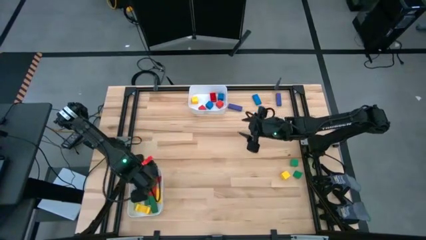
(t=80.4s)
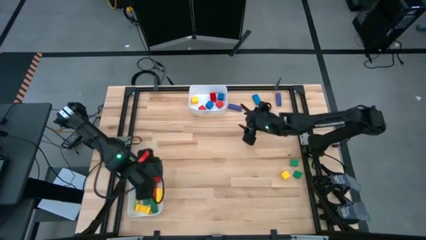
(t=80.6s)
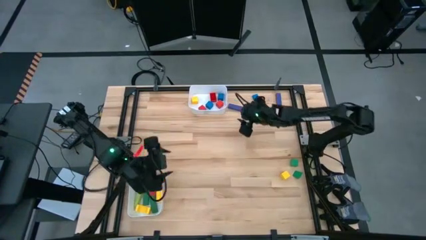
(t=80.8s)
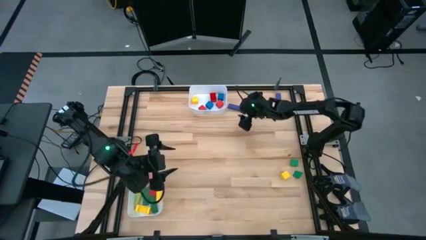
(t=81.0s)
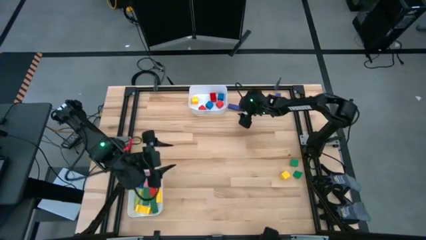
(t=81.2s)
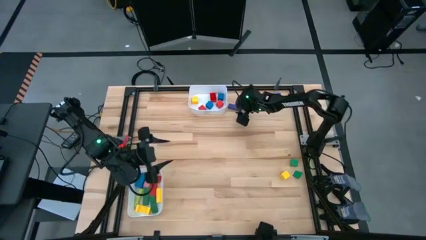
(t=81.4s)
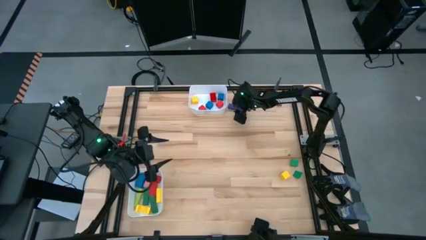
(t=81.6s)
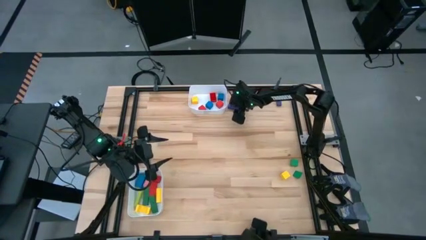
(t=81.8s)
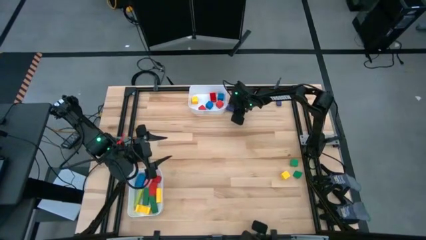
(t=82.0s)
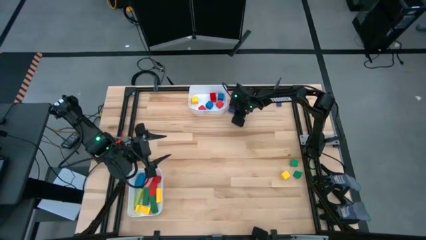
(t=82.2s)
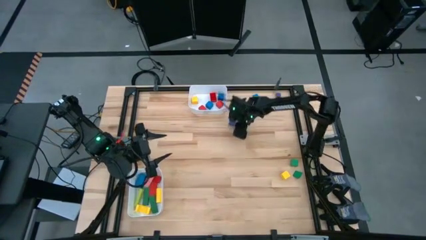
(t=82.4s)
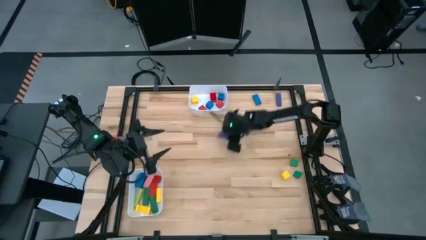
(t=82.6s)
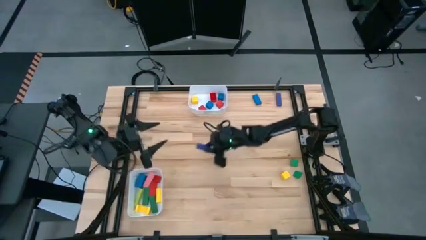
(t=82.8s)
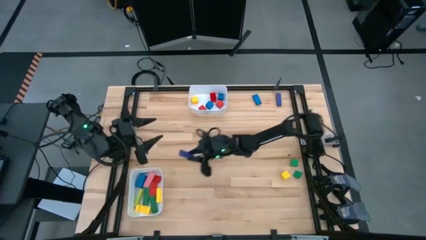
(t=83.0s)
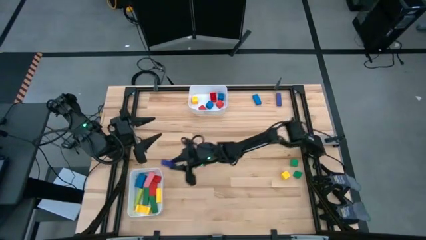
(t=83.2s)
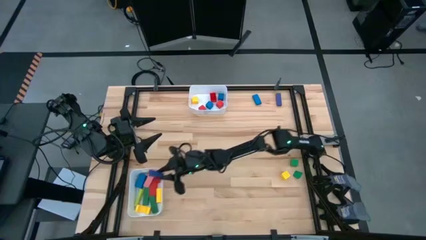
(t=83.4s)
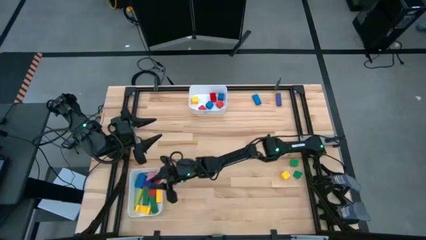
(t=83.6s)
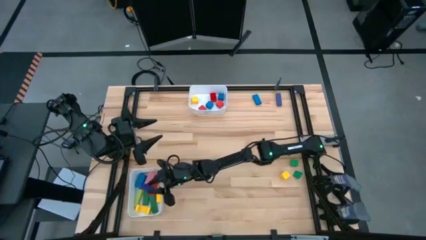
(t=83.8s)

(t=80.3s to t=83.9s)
Task: Sort blocks by size
Put the violet rectangular block into the bottom white bin

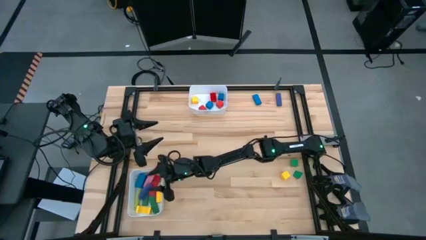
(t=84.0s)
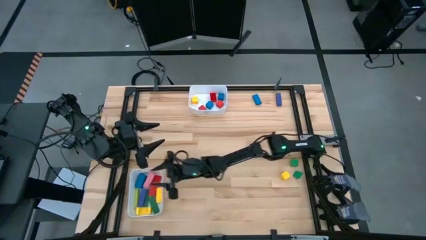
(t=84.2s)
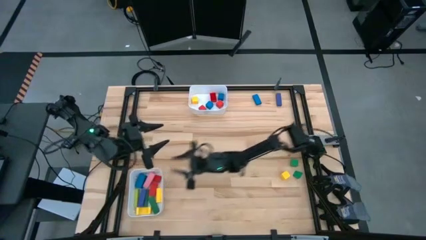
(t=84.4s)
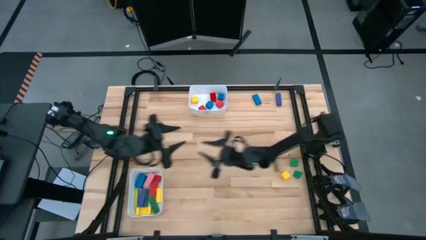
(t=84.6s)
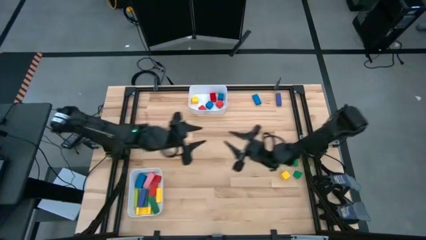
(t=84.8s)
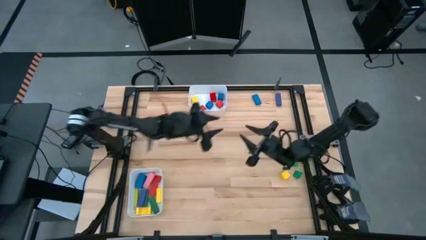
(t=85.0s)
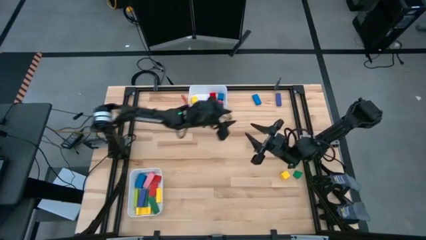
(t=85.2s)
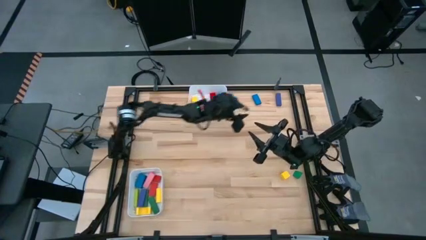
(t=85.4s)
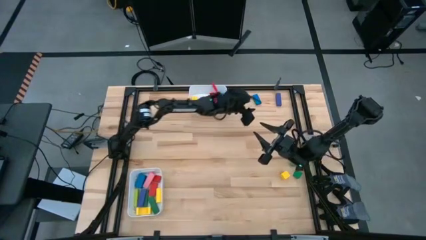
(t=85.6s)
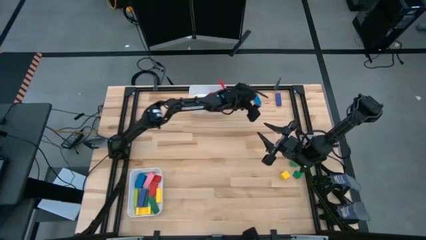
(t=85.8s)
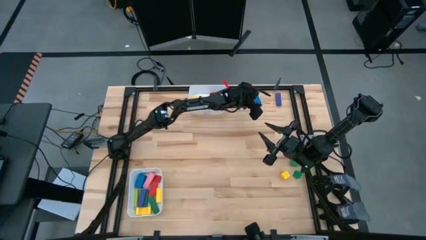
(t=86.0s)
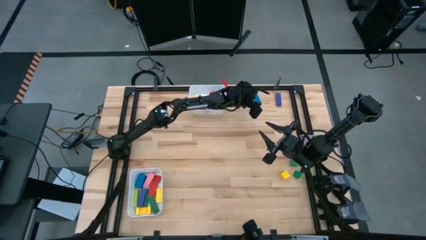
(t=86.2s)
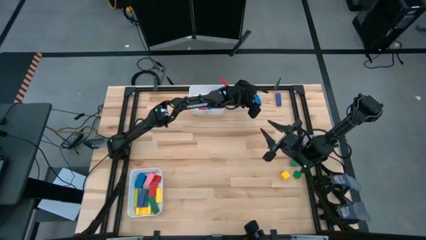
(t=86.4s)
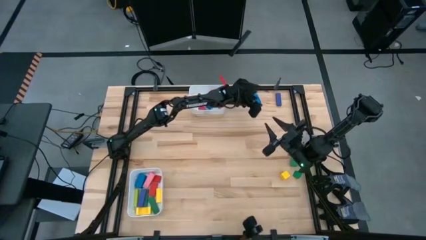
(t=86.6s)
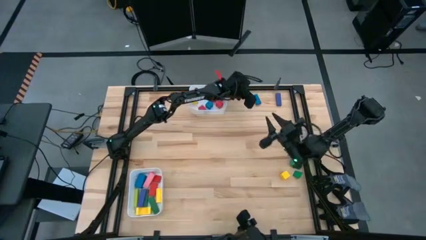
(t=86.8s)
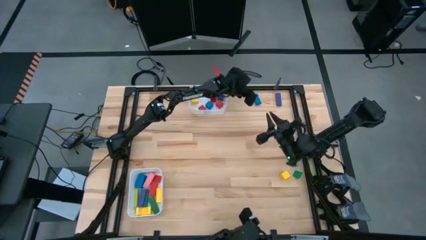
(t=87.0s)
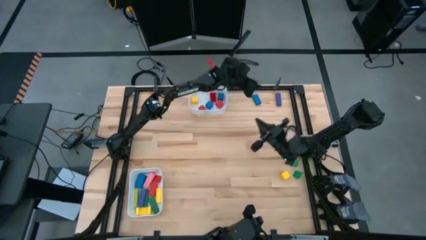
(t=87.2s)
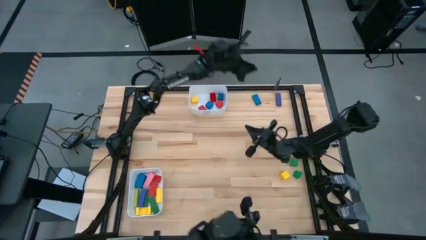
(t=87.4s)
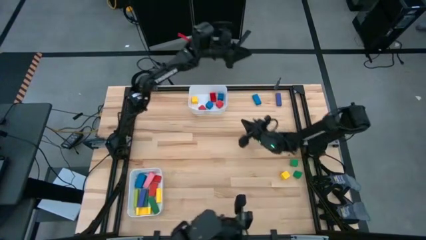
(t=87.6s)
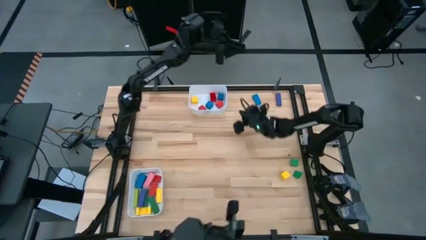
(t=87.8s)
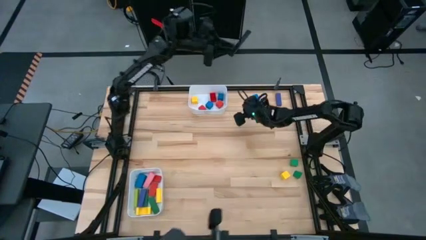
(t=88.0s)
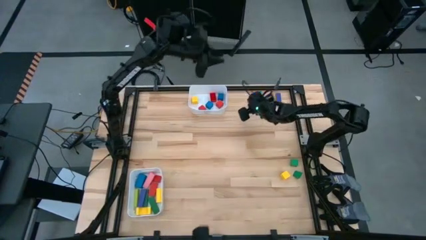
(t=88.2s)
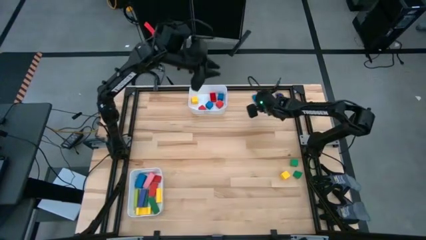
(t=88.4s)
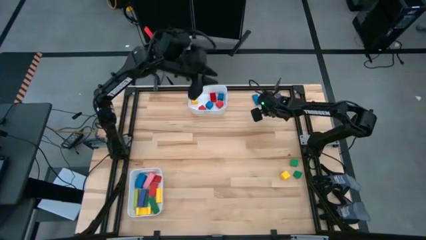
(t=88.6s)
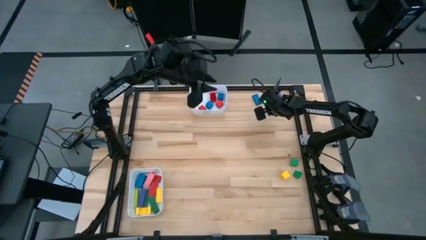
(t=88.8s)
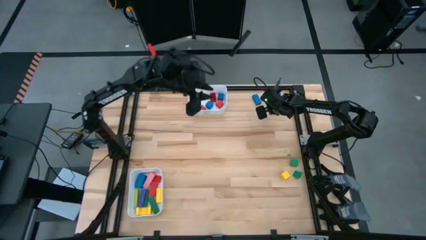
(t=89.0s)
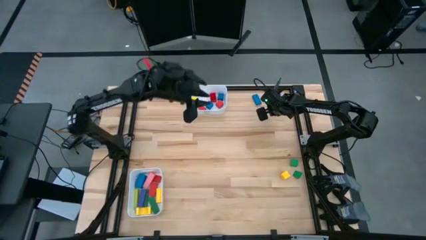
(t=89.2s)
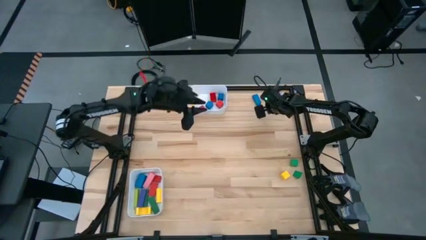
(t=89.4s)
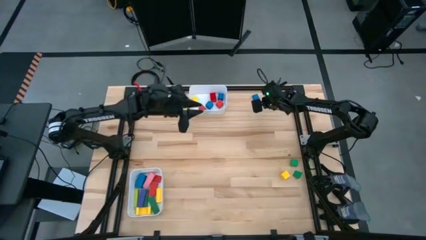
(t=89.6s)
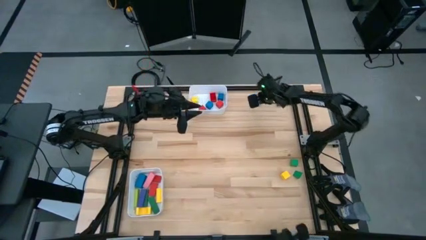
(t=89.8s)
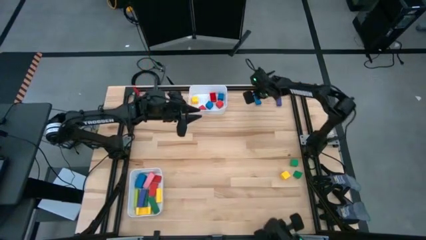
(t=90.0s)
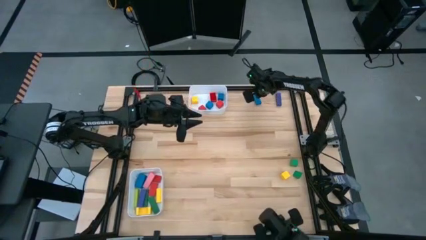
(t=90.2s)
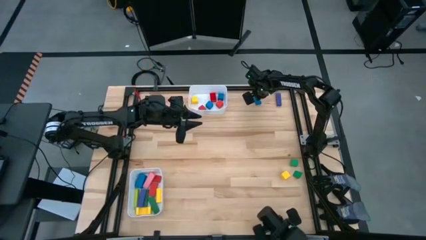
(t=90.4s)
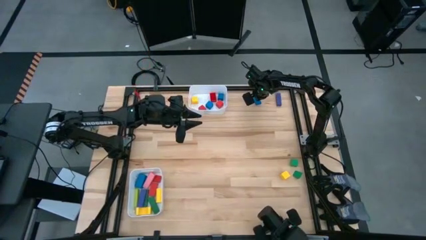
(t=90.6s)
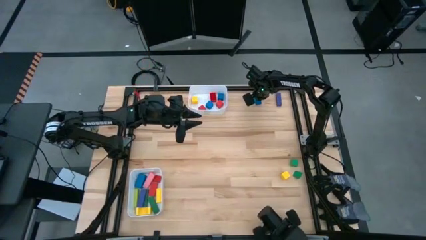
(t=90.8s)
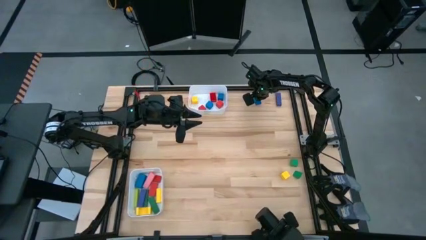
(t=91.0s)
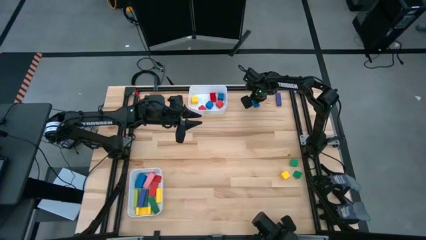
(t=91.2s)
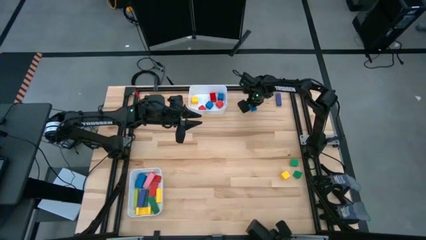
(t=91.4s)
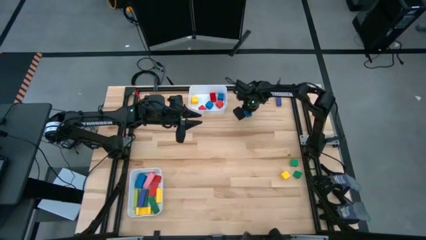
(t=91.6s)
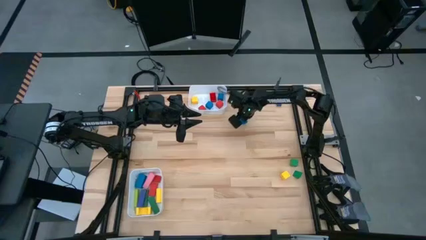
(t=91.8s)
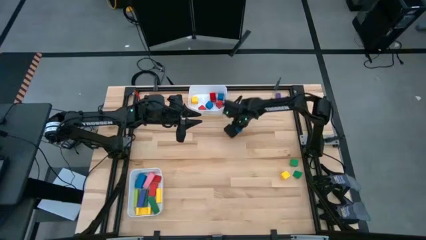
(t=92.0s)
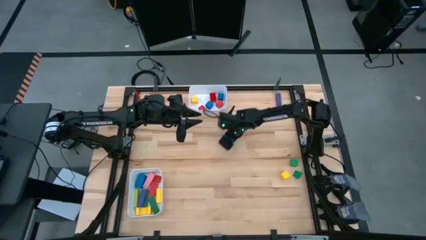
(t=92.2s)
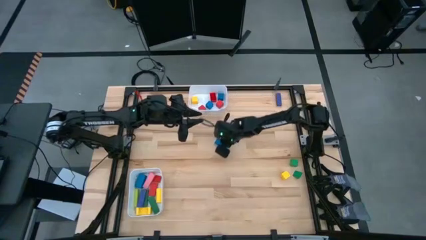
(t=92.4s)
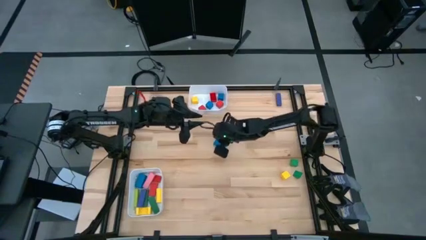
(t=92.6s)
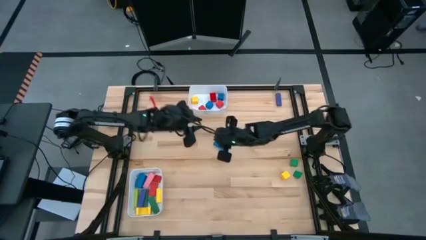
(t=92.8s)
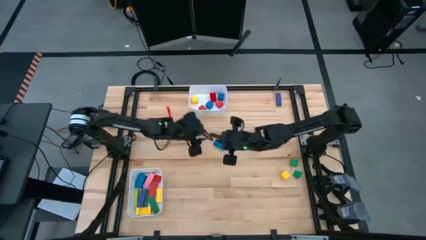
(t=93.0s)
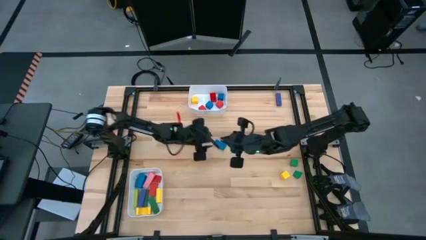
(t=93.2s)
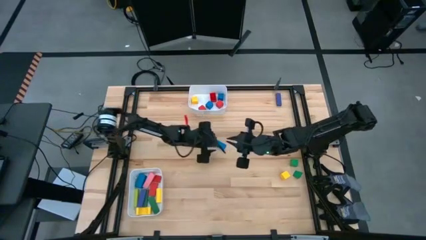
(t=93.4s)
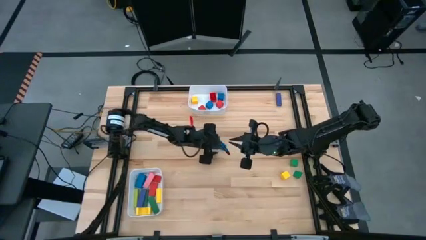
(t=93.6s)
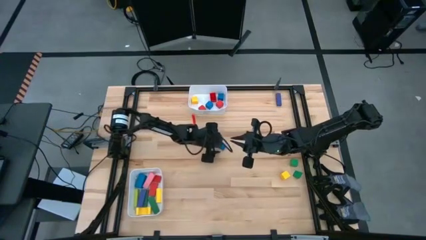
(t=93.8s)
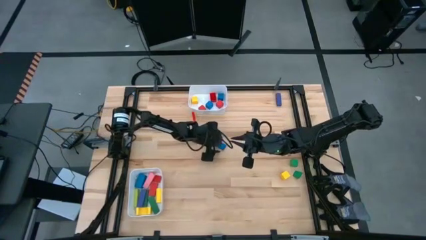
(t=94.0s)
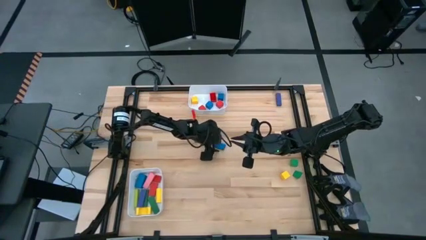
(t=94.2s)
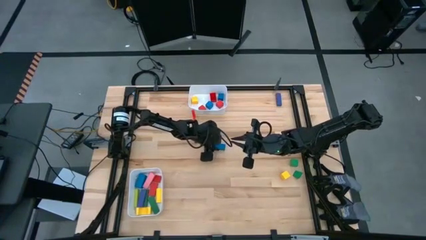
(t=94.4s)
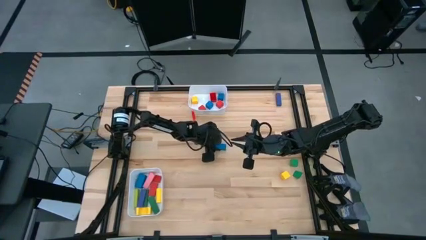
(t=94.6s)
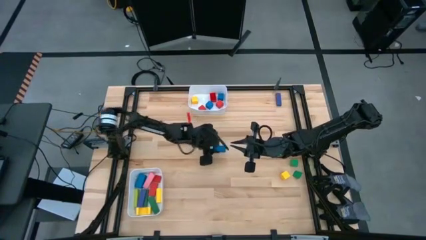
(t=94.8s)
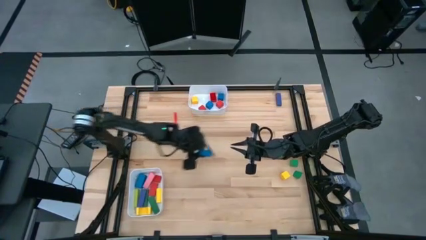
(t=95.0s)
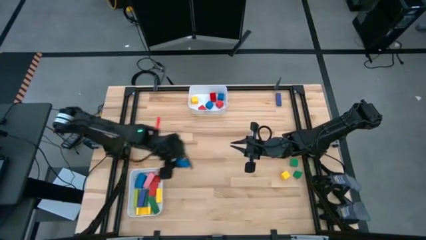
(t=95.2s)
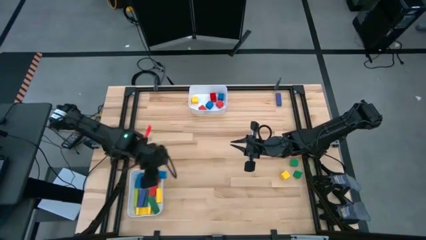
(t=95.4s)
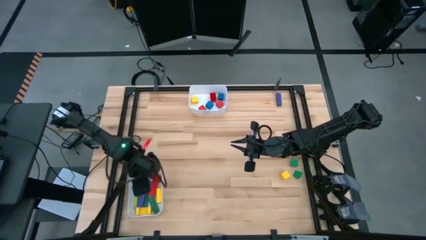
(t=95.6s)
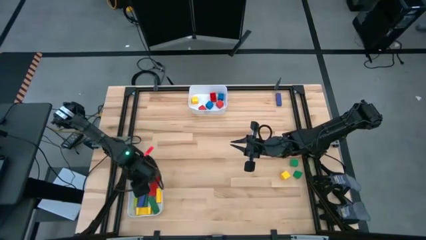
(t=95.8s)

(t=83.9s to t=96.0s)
Put the blue rectangular block into the bottom white bin
